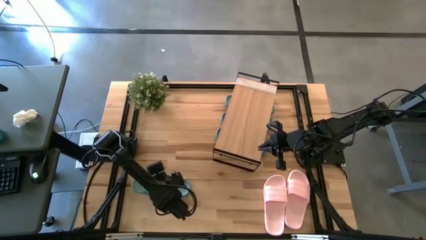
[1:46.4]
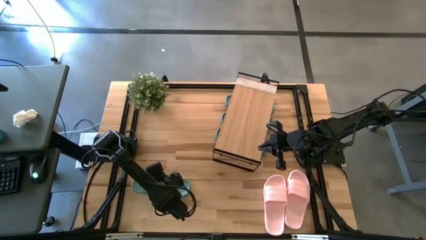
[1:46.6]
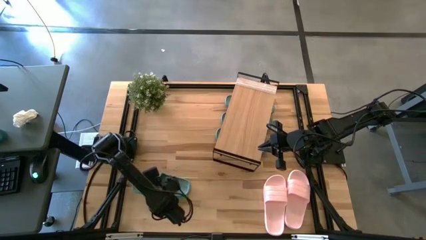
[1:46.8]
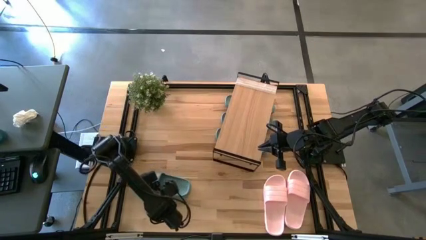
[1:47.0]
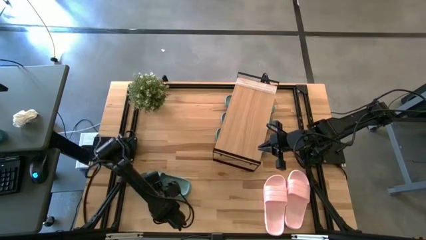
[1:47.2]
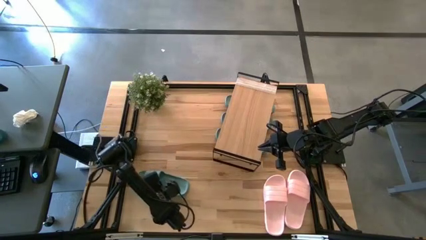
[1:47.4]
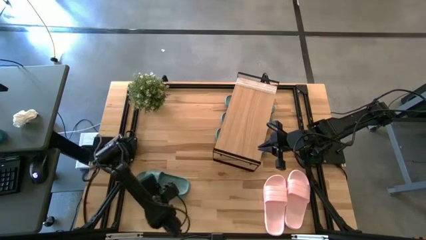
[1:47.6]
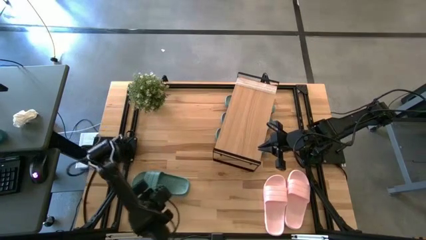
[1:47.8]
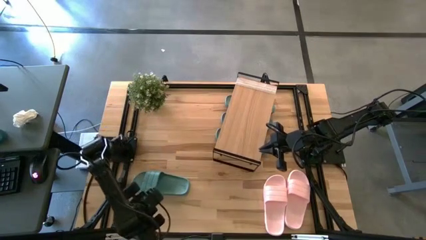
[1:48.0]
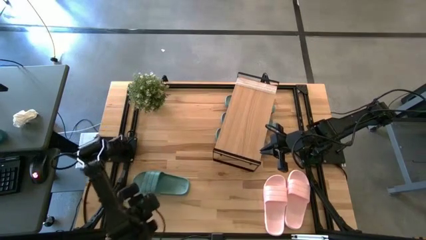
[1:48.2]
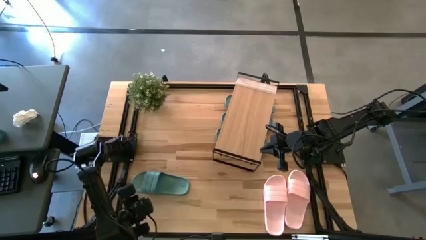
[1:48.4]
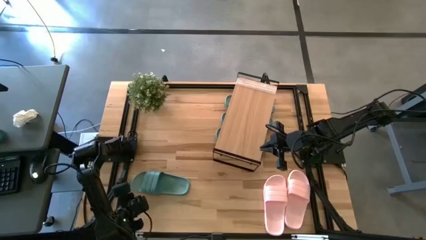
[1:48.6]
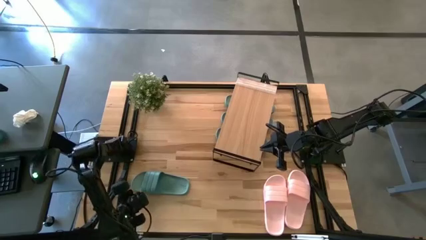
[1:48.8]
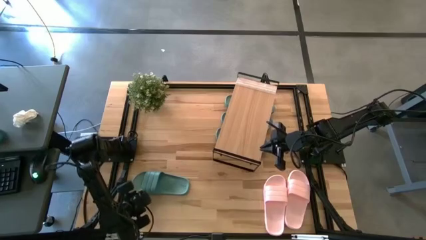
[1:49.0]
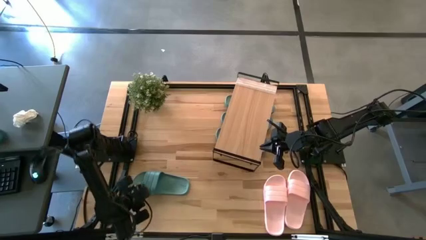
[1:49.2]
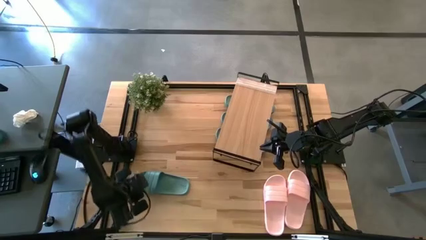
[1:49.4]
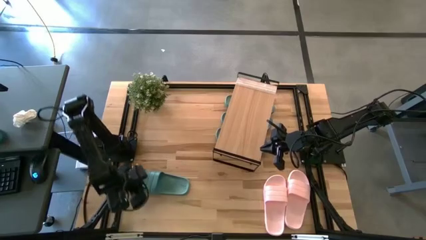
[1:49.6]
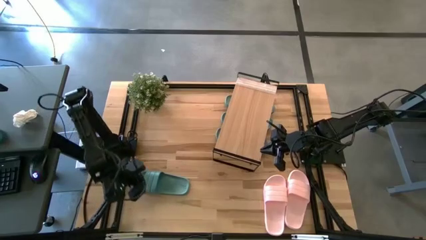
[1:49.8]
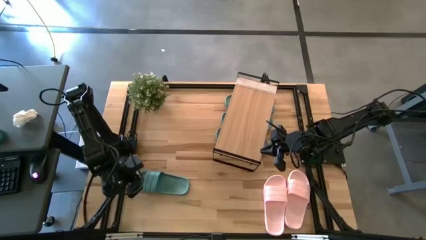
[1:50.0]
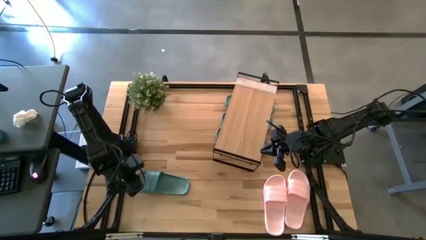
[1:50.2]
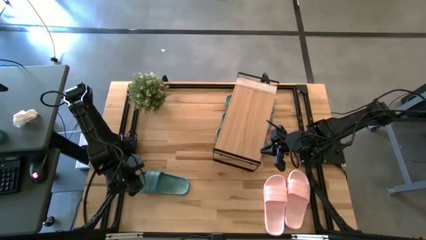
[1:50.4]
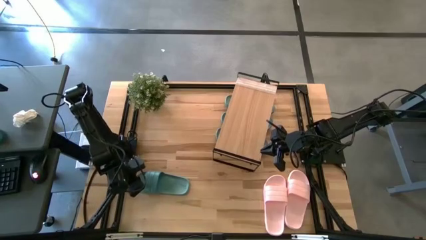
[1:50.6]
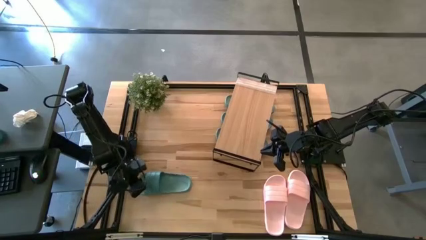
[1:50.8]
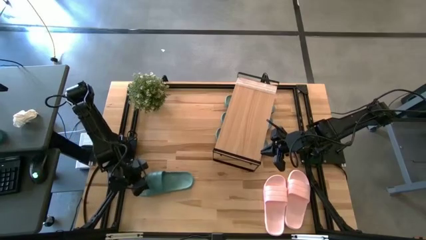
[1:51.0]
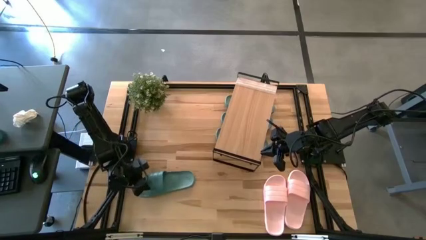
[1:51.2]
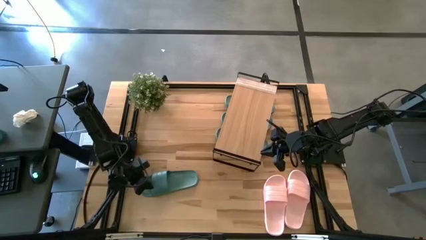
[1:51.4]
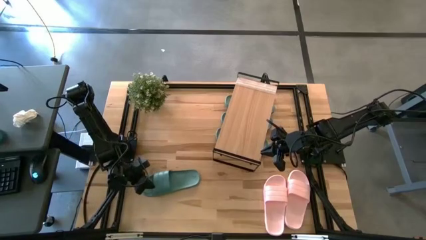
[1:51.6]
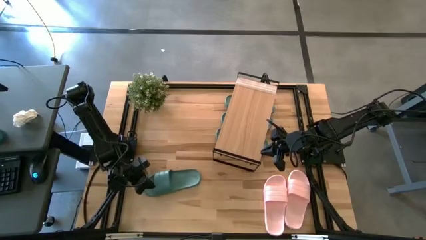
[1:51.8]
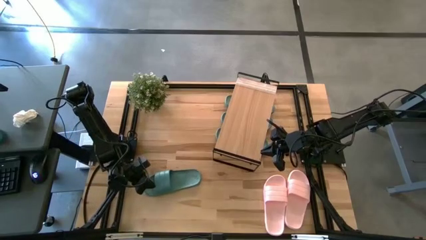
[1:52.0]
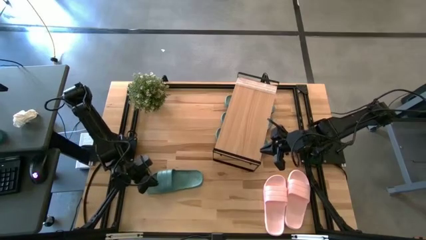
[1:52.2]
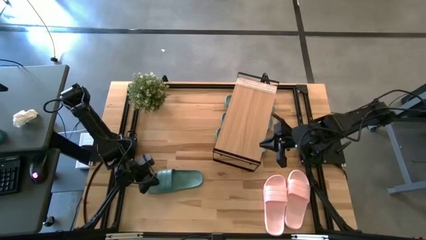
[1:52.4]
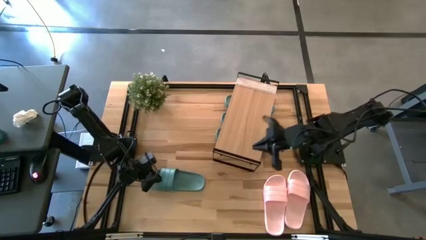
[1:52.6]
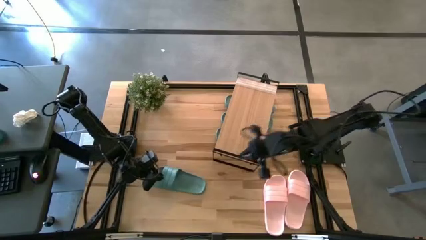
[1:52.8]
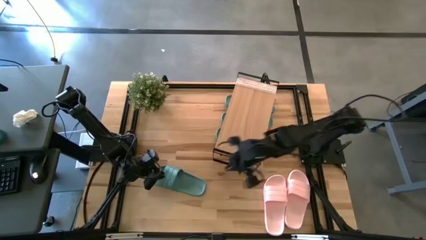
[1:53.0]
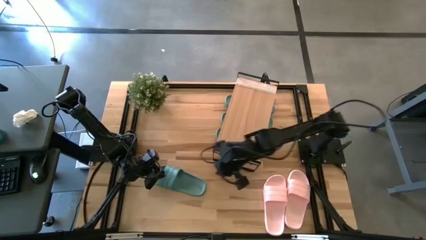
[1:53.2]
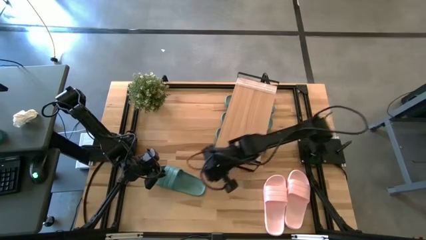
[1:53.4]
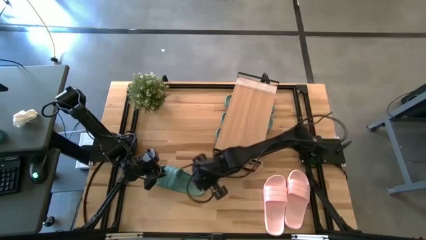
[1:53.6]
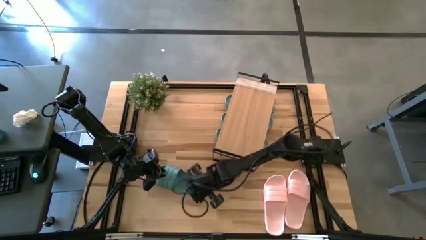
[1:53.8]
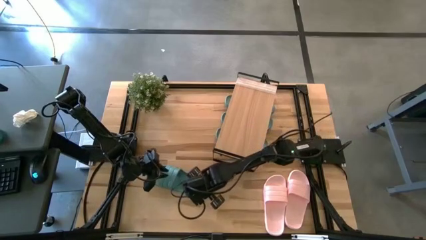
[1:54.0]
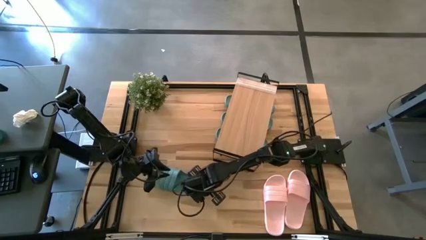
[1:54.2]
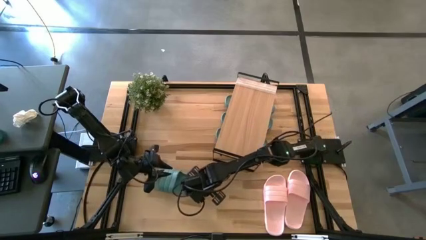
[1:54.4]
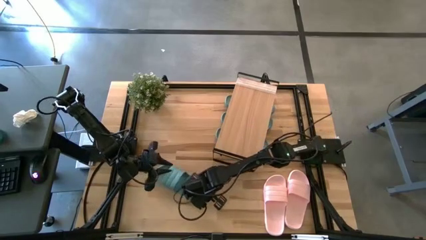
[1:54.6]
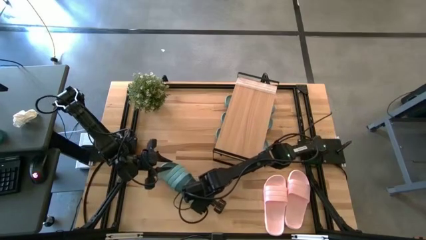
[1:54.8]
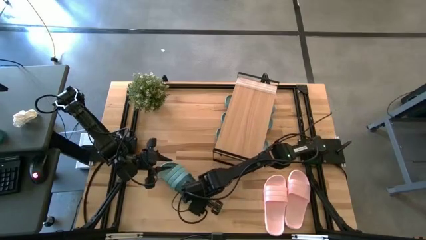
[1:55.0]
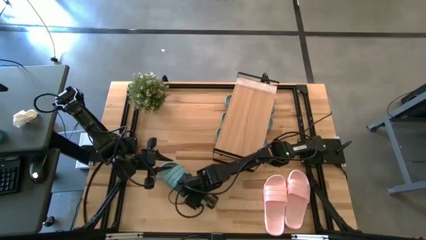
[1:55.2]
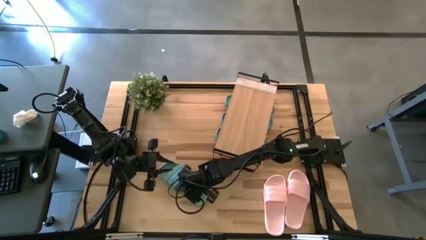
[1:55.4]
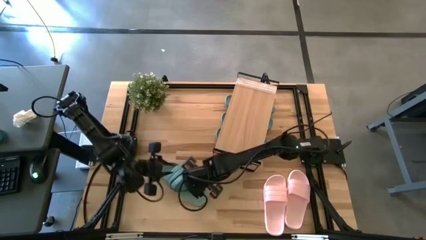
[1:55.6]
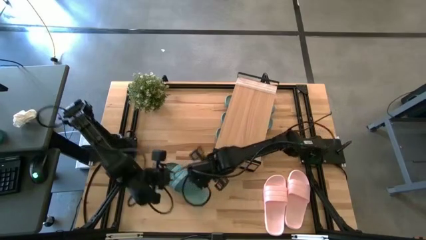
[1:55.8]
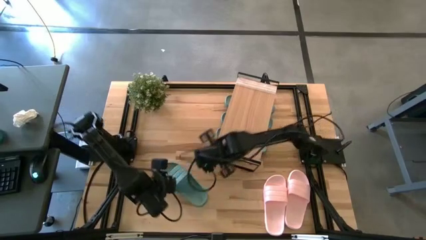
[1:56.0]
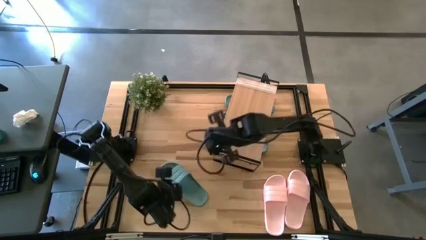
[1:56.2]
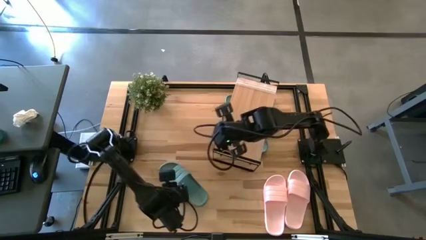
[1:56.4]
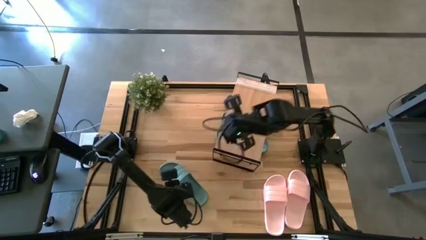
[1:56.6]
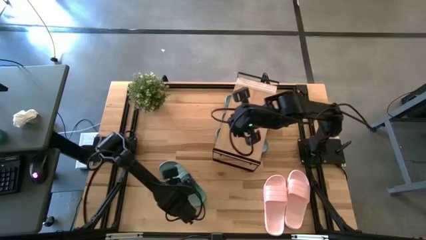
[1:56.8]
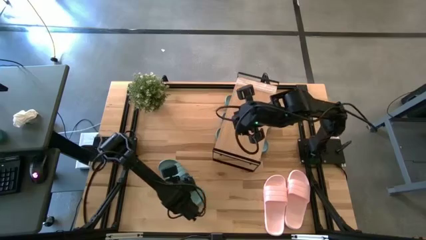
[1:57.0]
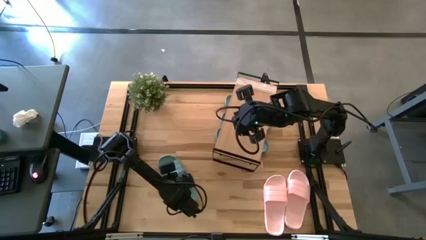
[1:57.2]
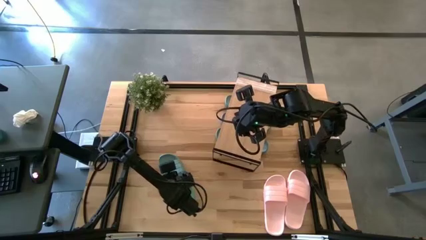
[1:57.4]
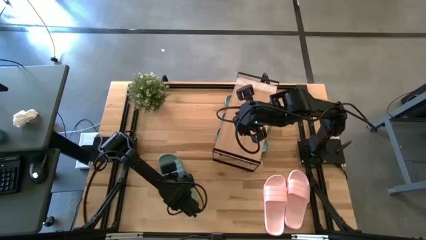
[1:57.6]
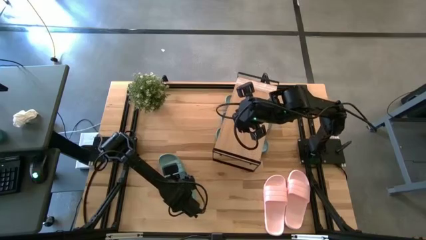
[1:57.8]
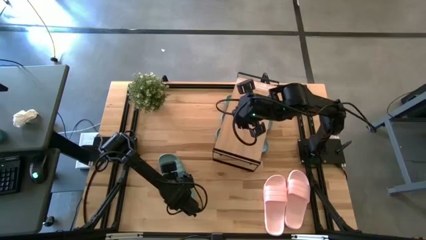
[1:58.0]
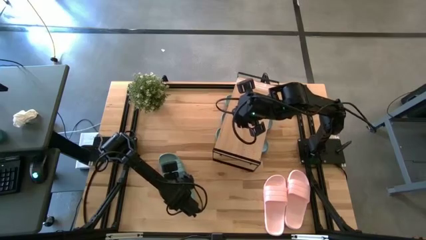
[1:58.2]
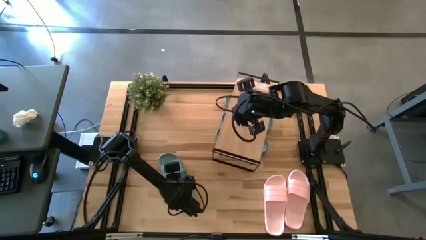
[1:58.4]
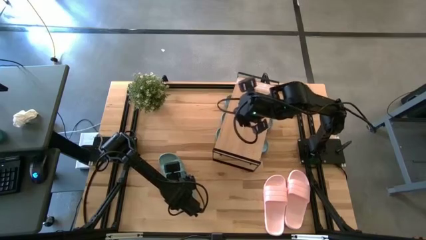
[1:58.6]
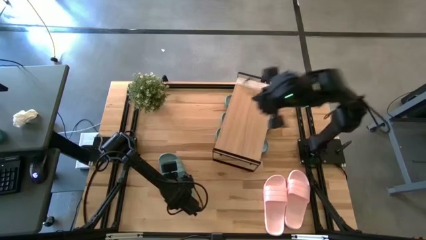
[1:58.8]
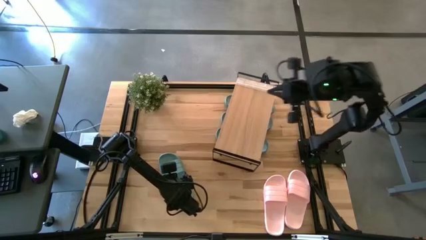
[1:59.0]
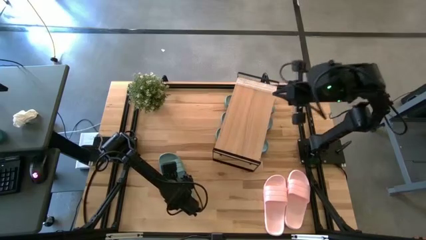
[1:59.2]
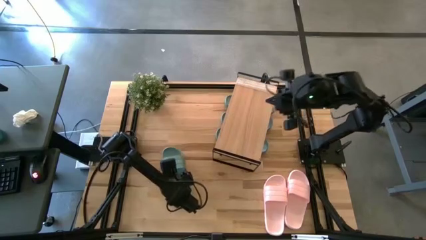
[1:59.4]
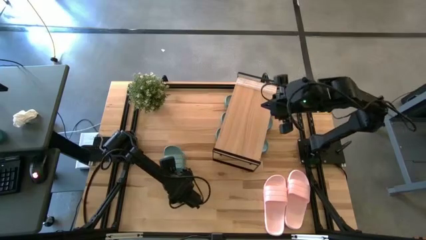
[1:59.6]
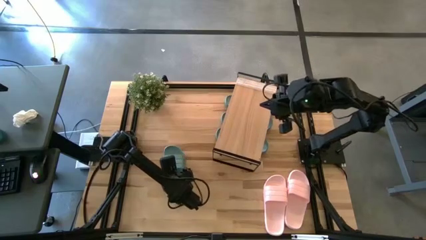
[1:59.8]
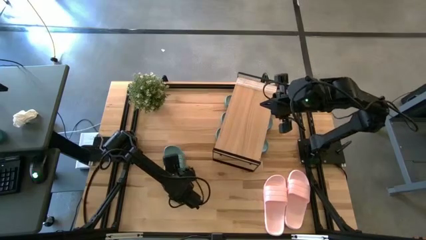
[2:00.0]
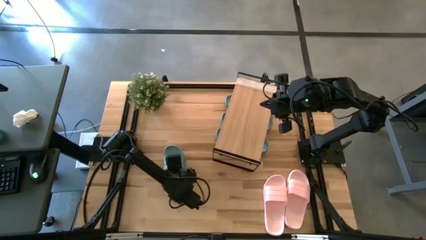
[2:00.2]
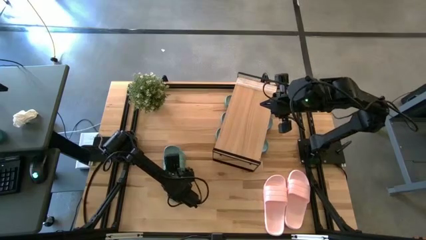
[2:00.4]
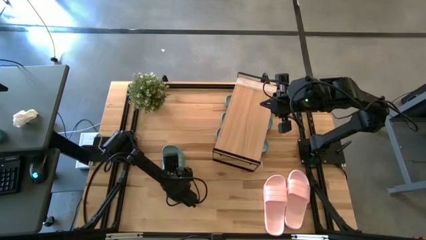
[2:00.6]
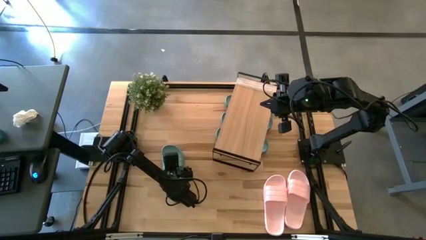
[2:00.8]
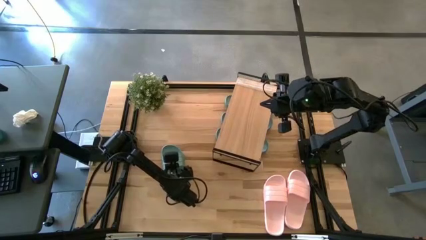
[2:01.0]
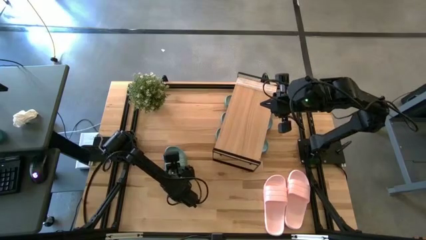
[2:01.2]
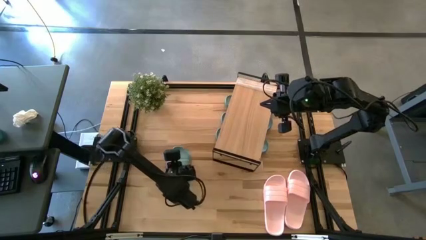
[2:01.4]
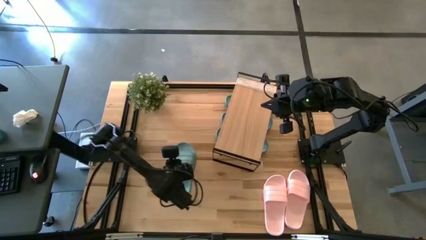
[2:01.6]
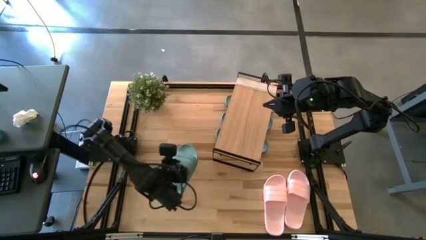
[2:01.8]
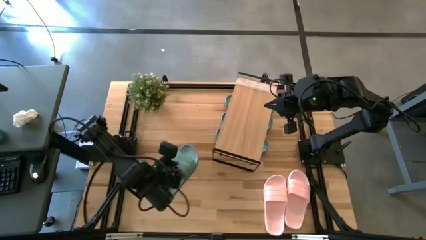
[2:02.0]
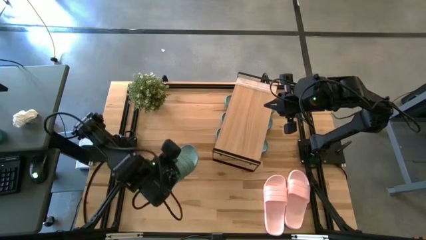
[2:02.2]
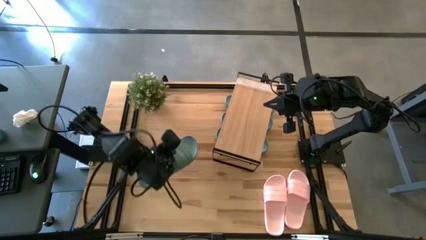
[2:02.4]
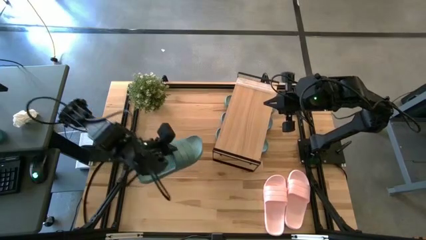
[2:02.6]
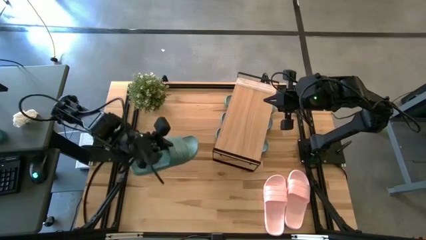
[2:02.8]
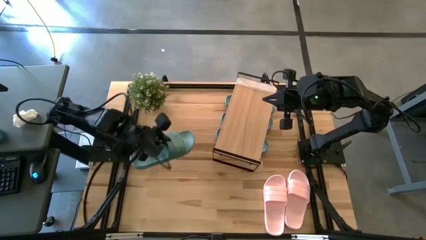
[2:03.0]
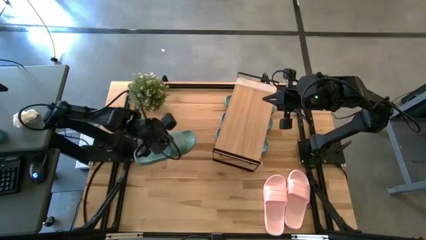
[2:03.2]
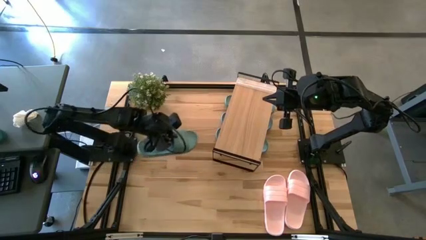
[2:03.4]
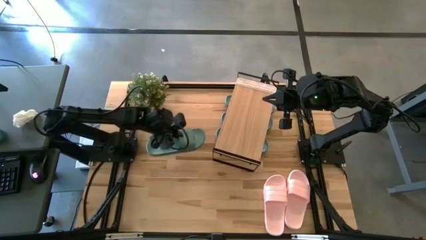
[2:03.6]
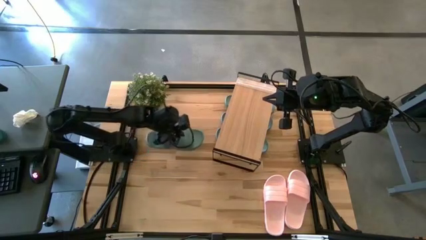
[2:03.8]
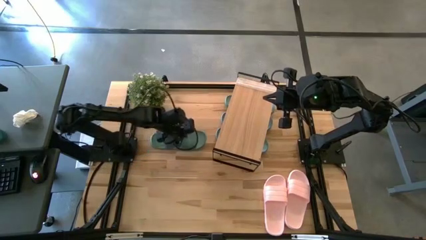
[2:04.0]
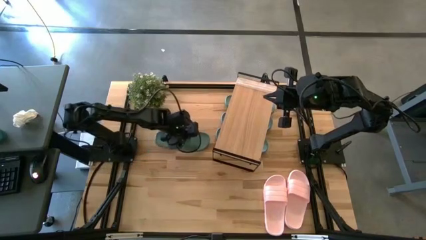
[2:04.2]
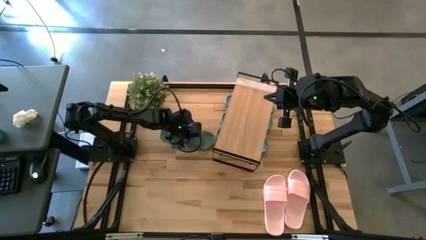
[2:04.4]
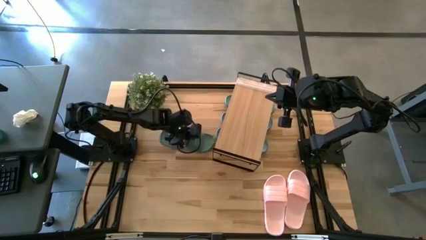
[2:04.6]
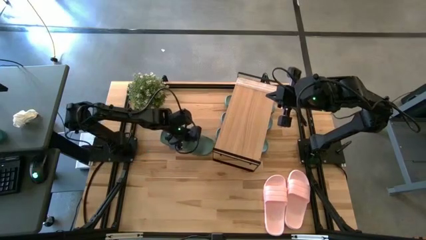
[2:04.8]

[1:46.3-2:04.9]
Task: Pick and place slides into the shelf
Put the green slide under the shelf
